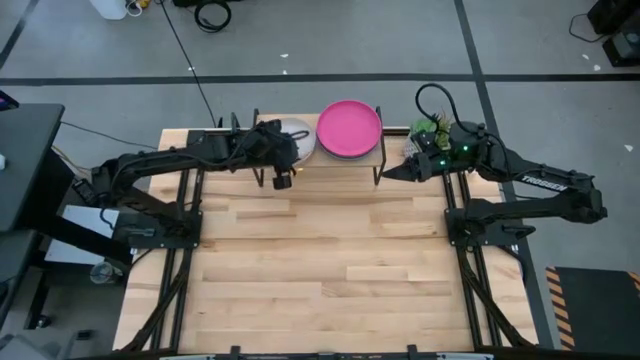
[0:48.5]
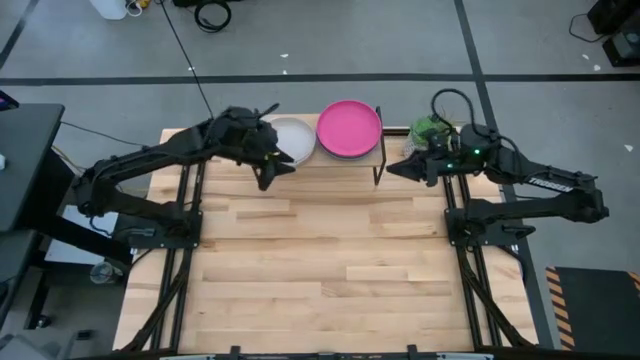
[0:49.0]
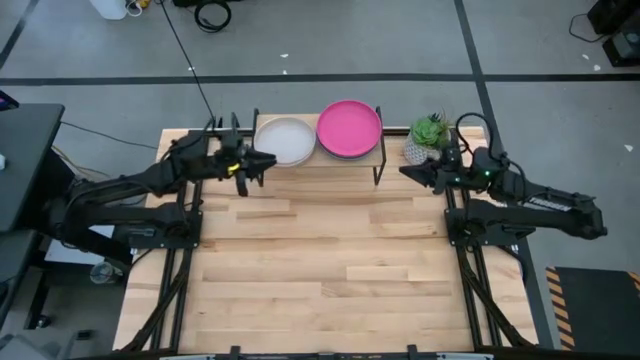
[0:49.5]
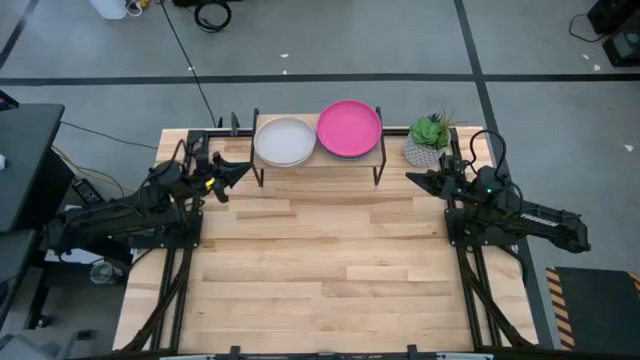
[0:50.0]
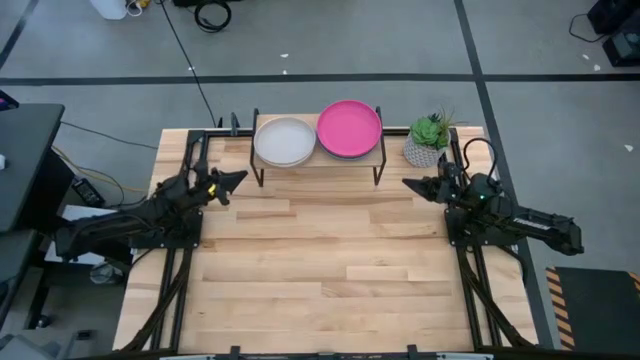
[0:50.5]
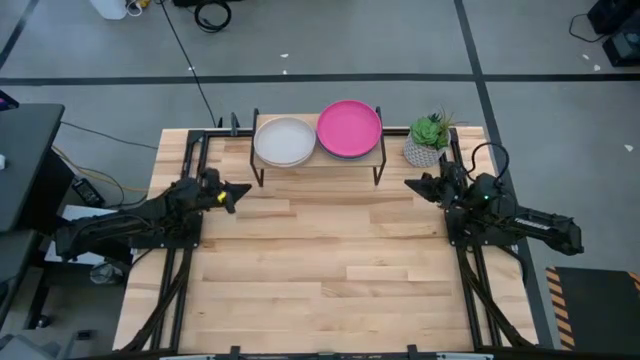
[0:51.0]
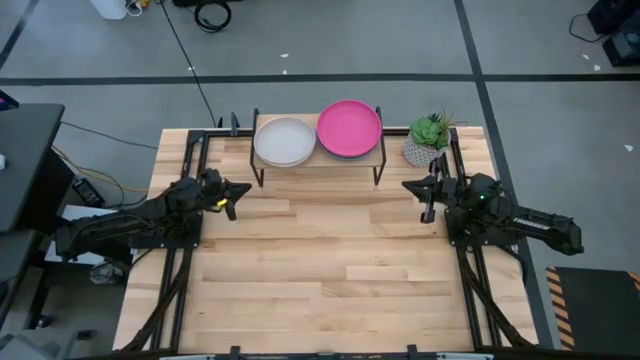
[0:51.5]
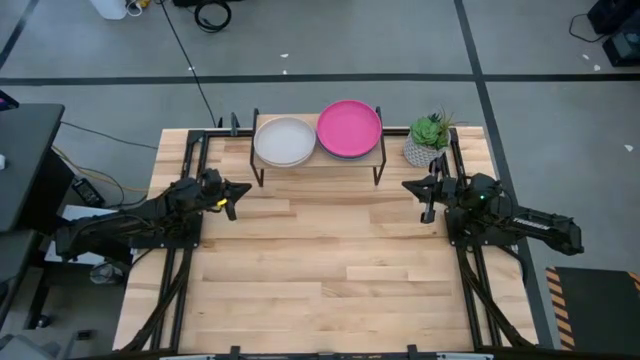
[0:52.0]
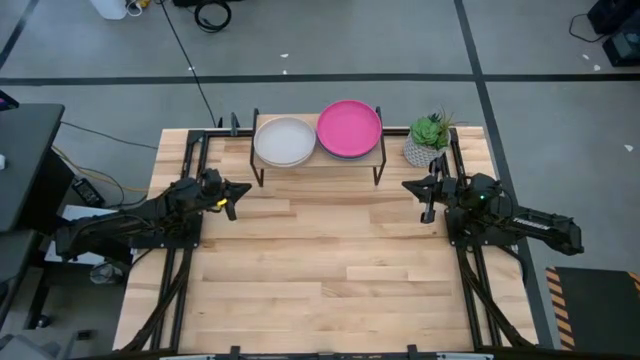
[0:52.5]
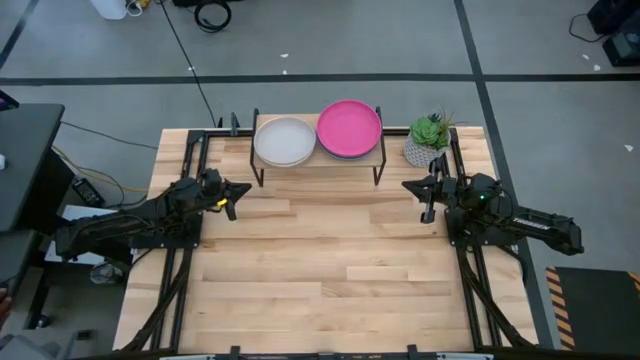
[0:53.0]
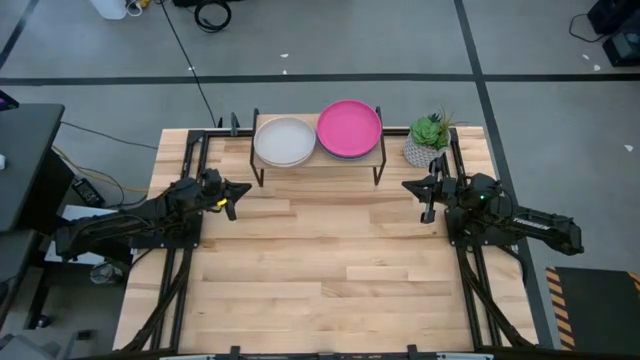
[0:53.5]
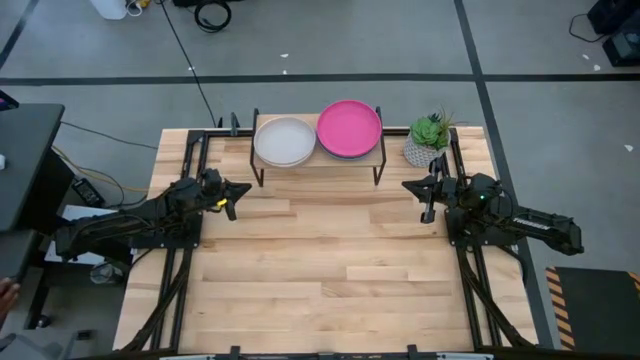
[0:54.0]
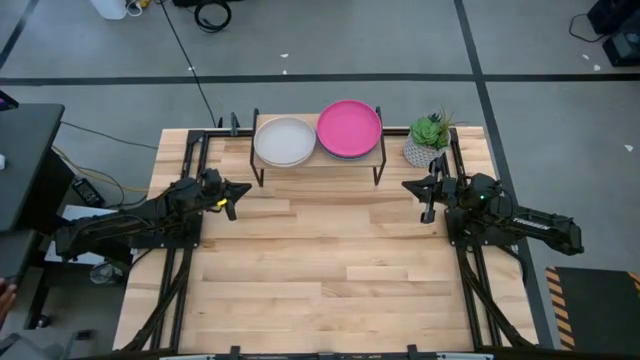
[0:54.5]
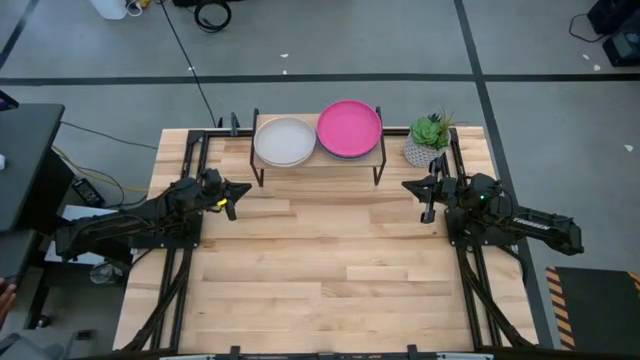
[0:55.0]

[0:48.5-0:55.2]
Task: Place and stack plates onto a shelf
Return to Home Position

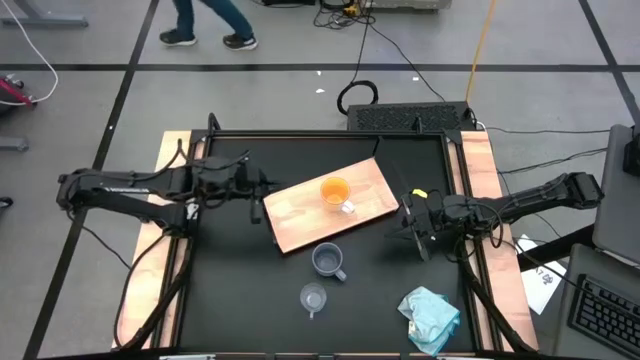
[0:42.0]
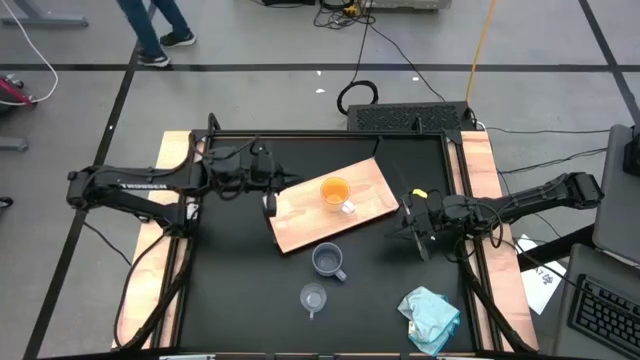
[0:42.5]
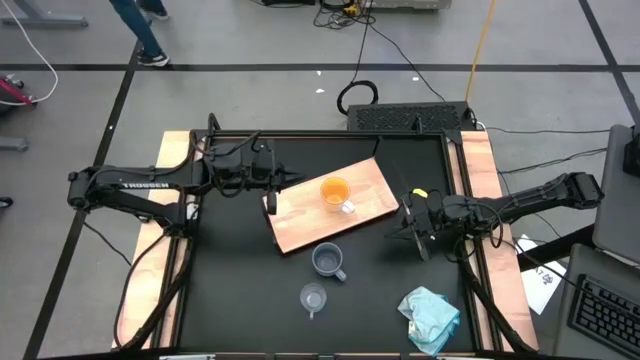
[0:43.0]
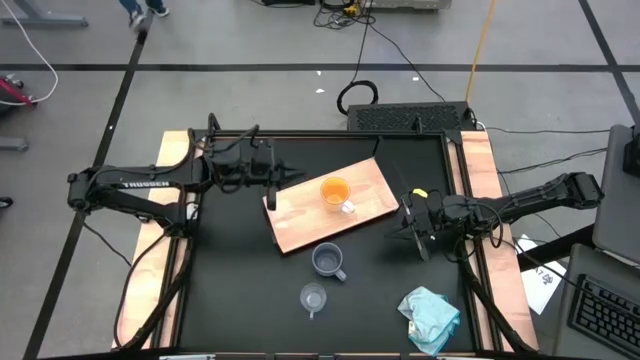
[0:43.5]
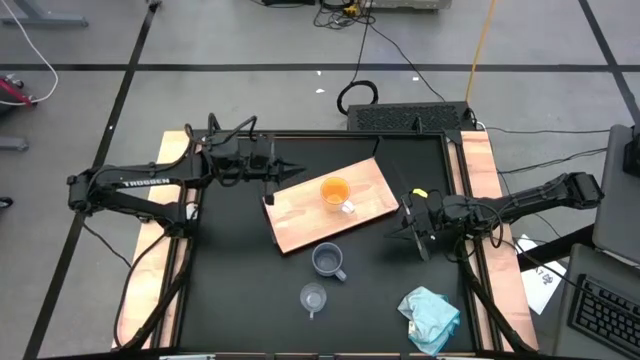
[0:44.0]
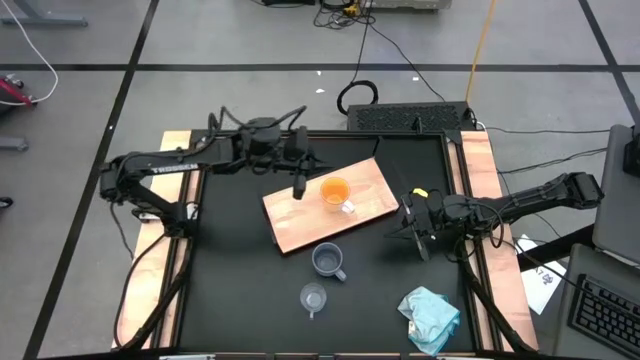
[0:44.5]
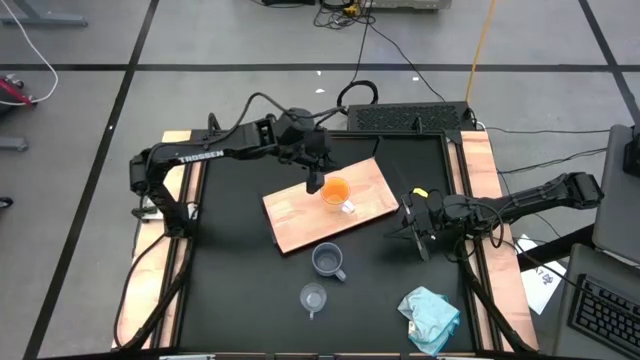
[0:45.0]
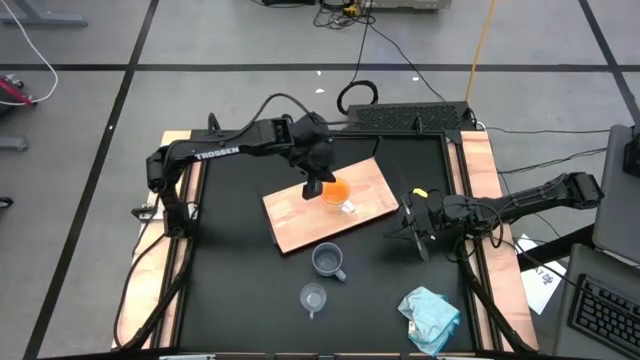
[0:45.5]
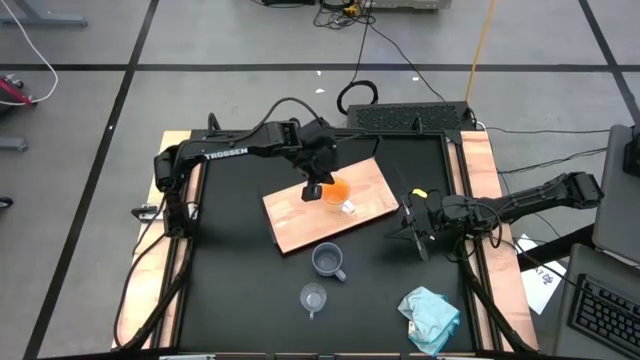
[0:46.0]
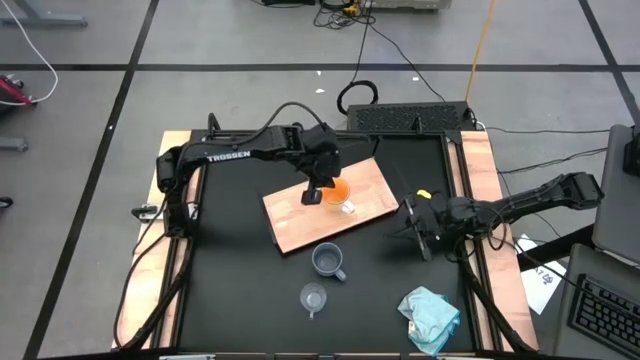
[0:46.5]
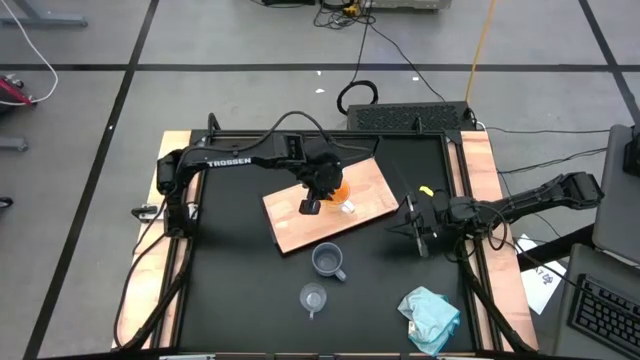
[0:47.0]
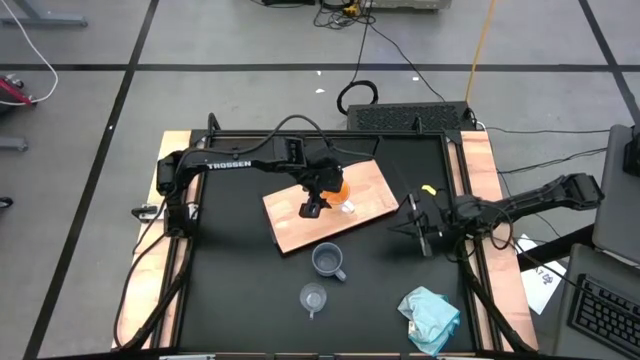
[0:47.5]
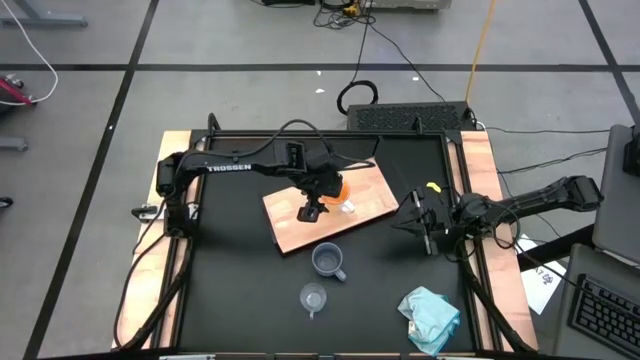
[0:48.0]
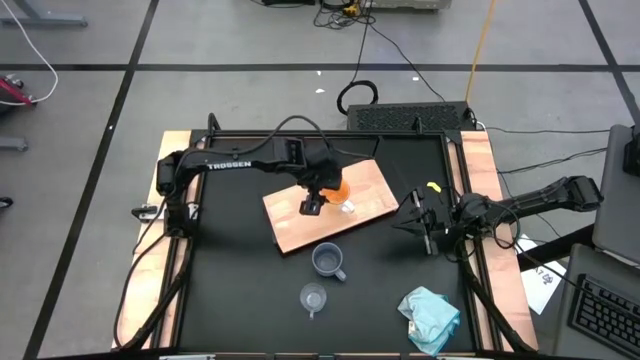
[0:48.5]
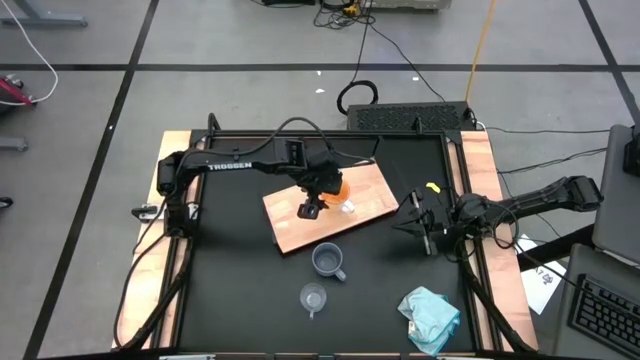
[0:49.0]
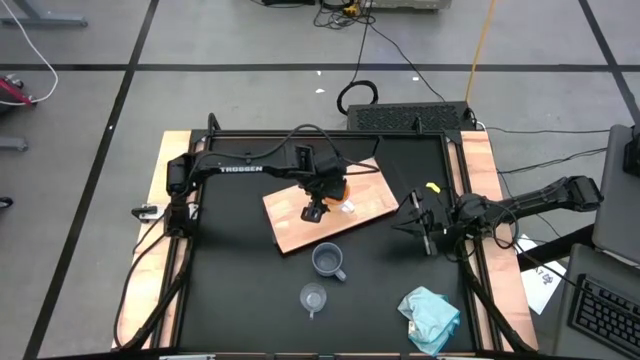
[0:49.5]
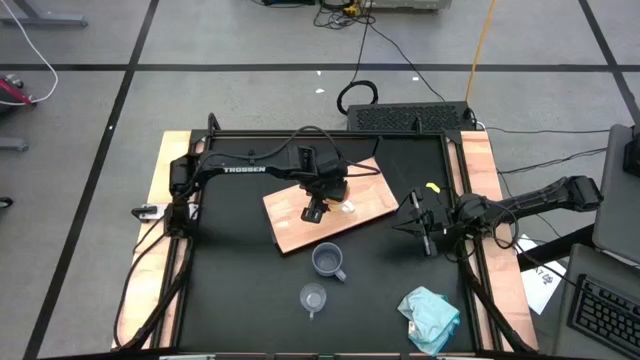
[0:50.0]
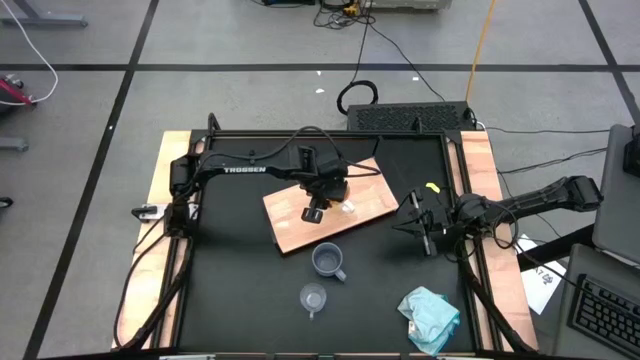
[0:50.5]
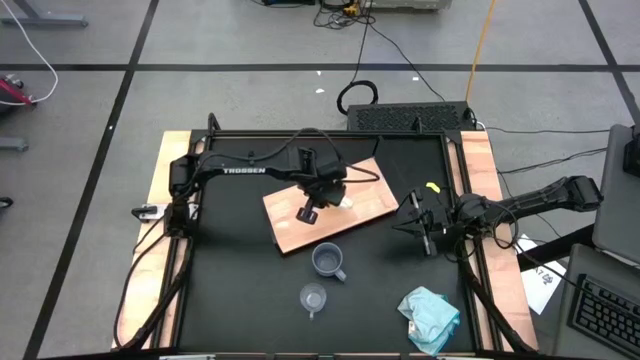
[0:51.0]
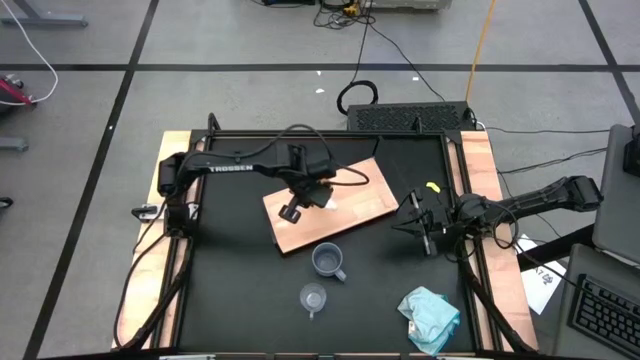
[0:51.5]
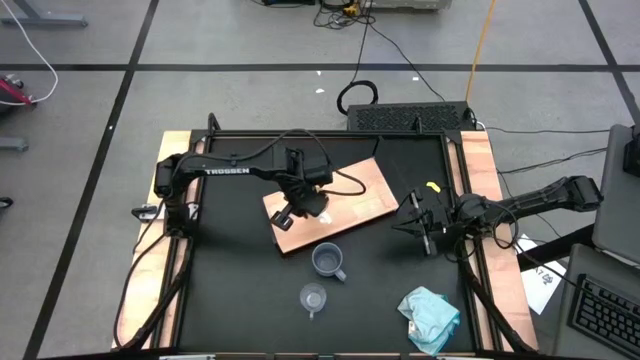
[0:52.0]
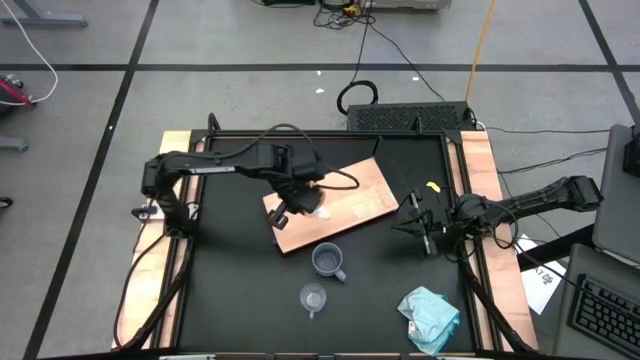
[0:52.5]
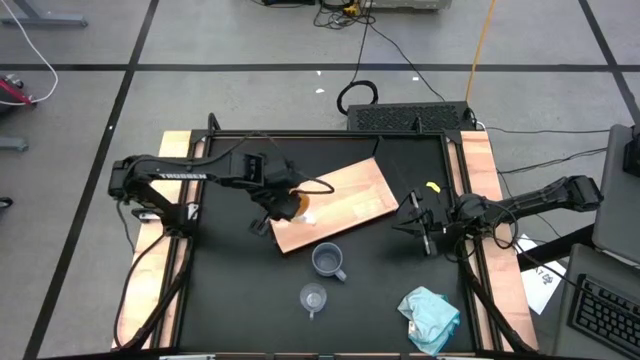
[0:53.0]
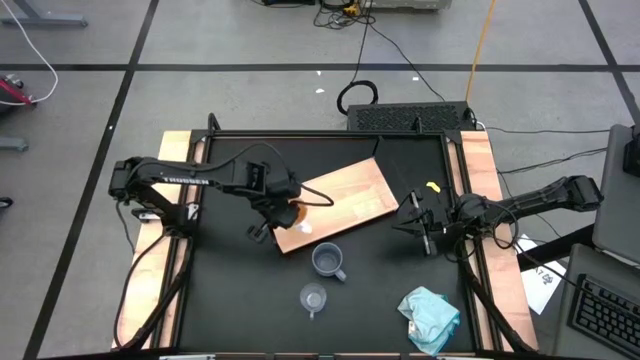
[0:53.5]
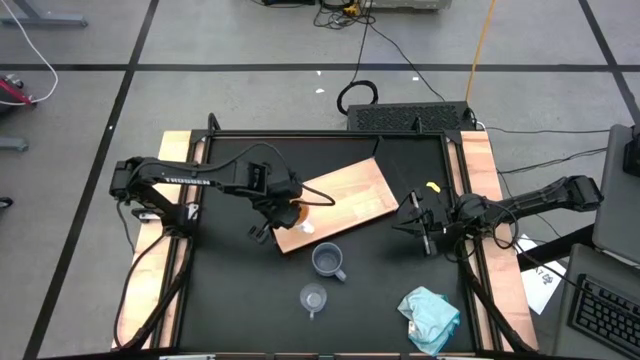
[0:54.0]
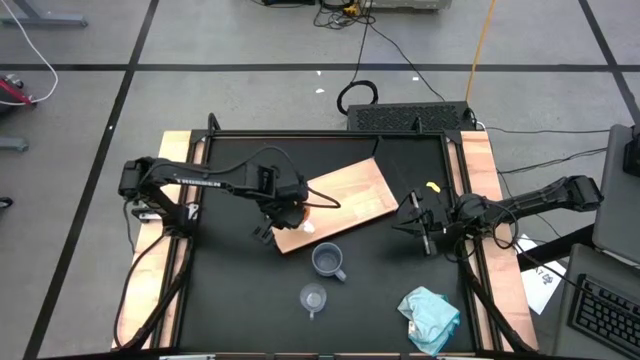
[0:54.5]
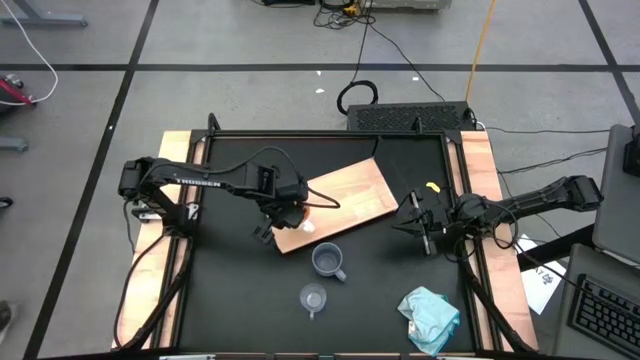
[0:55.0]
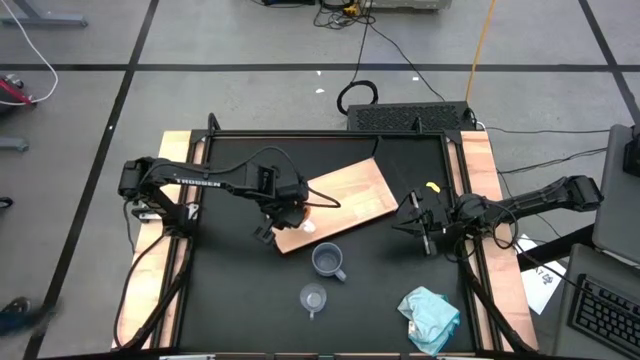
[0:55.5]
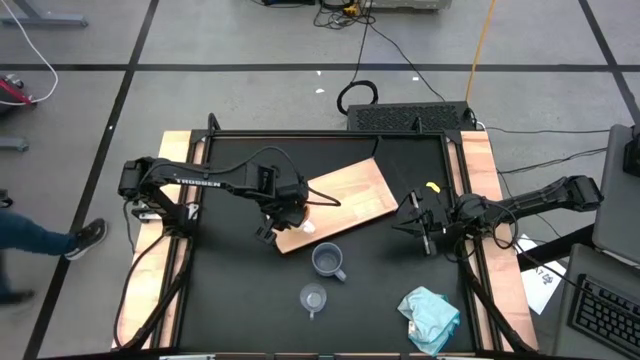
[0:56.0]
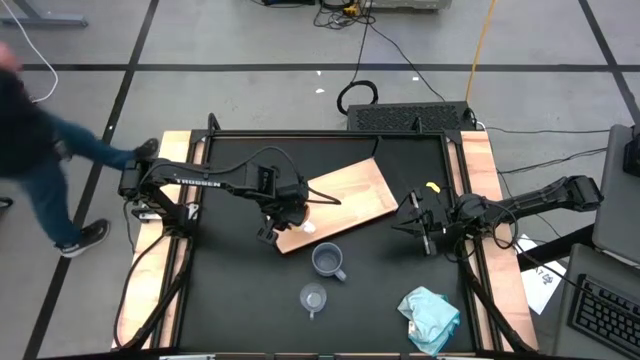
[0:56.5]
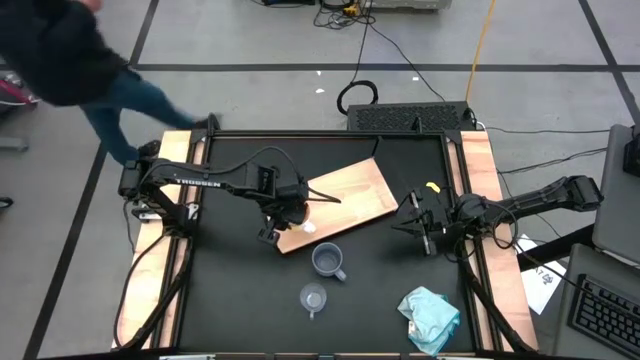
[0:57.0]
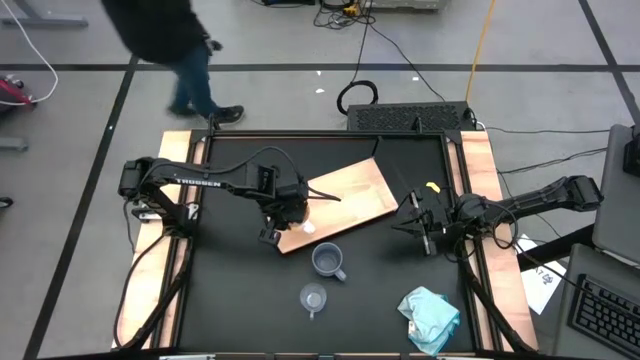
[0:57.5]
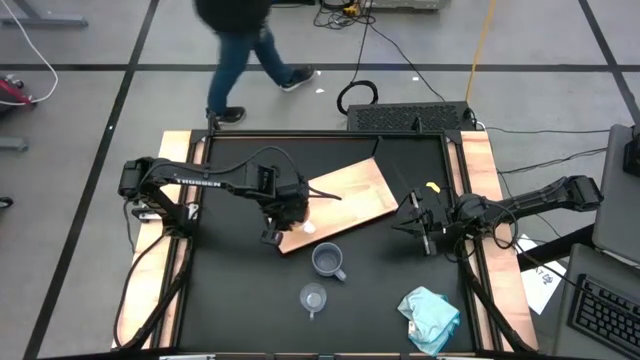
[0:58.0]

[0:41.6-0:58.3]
Task: Stack small to large cups/mugs on shelf
Put the orange mug on the shelf
